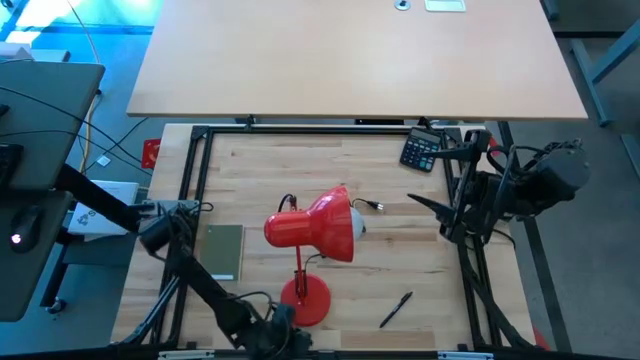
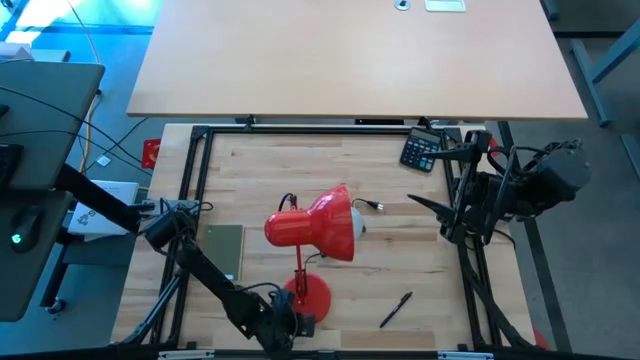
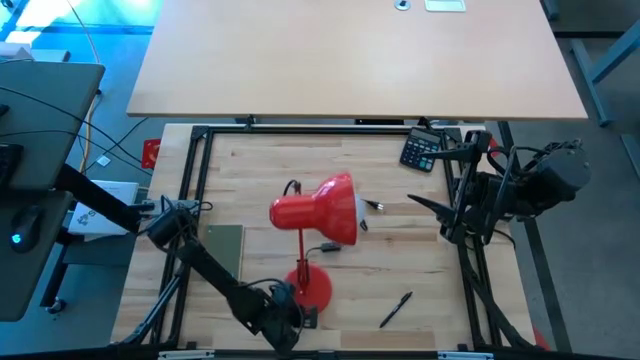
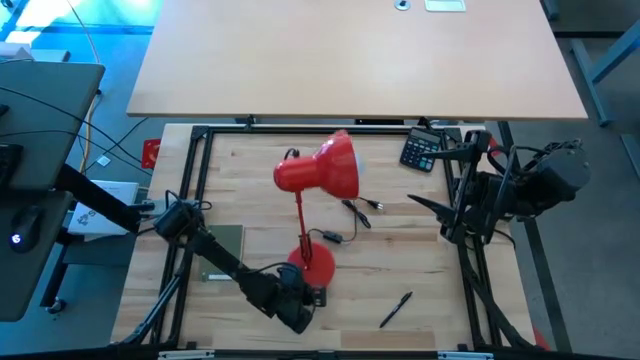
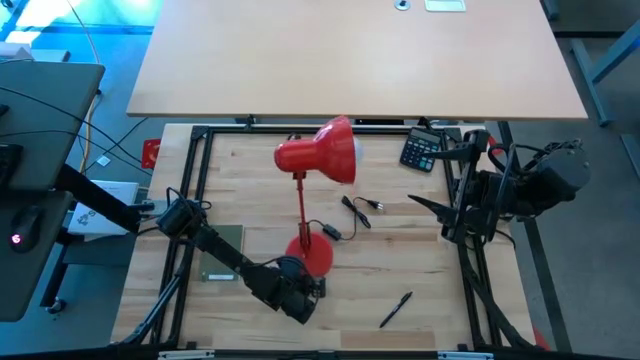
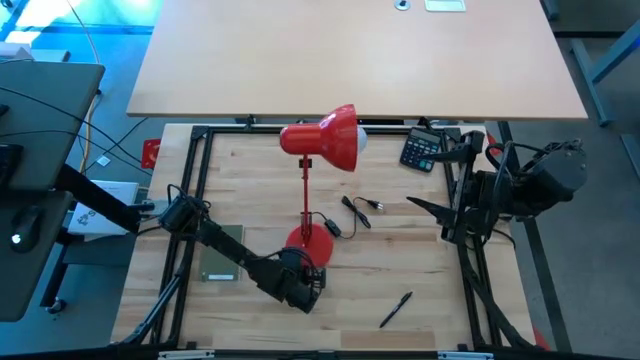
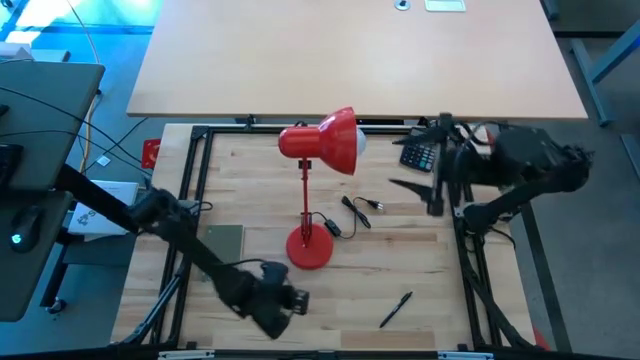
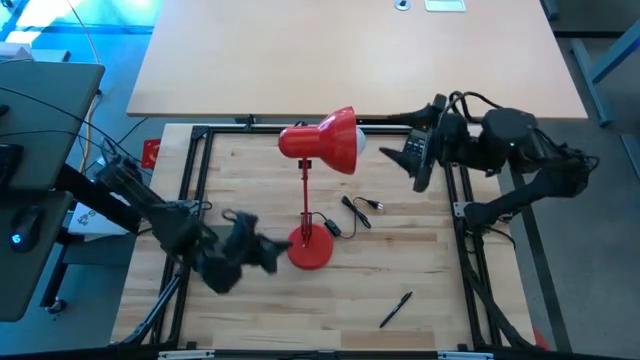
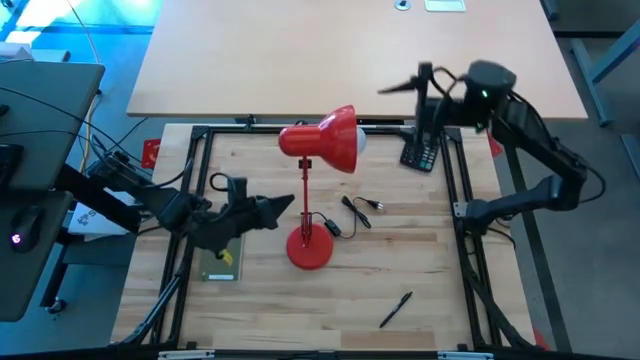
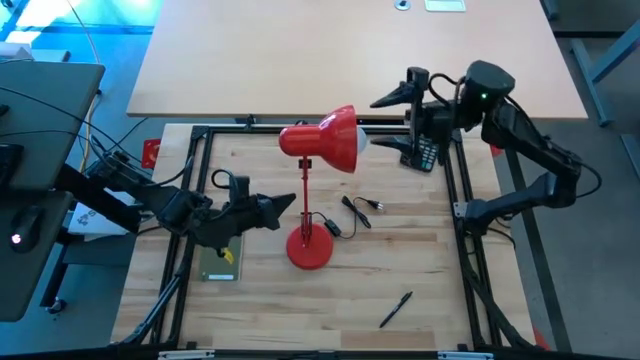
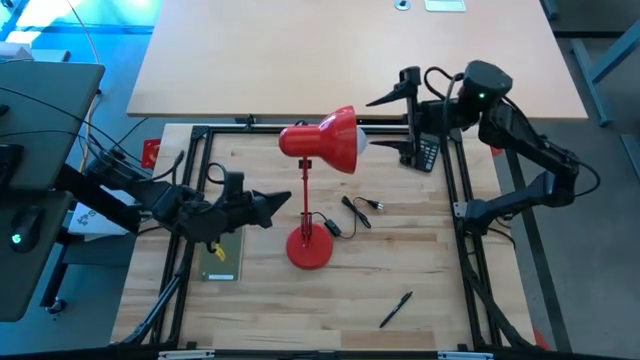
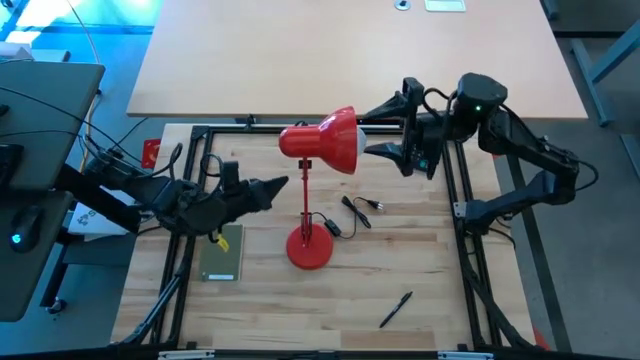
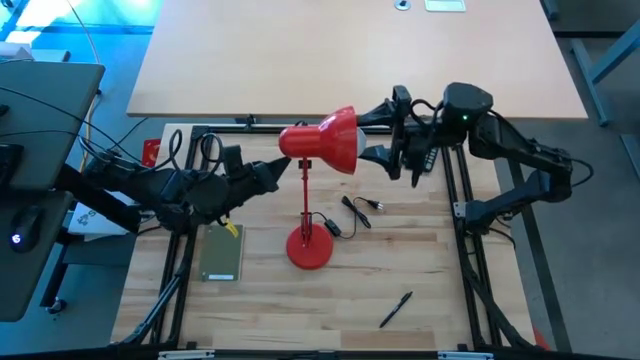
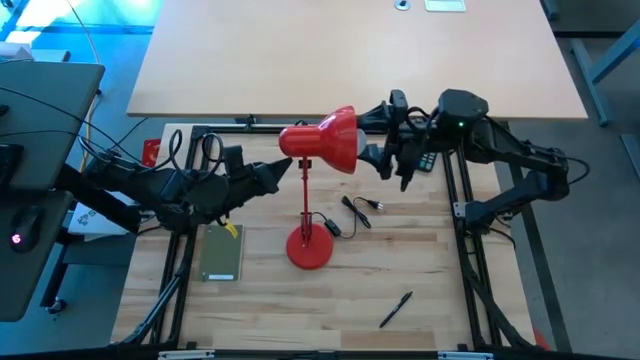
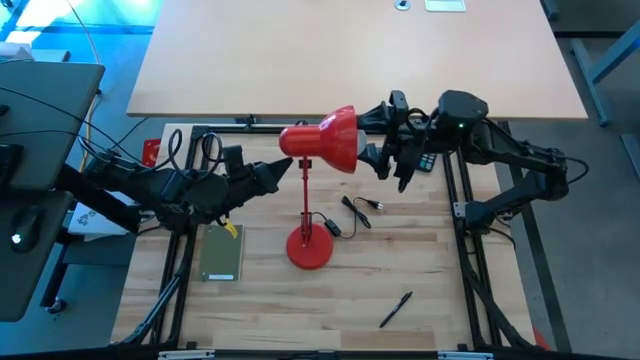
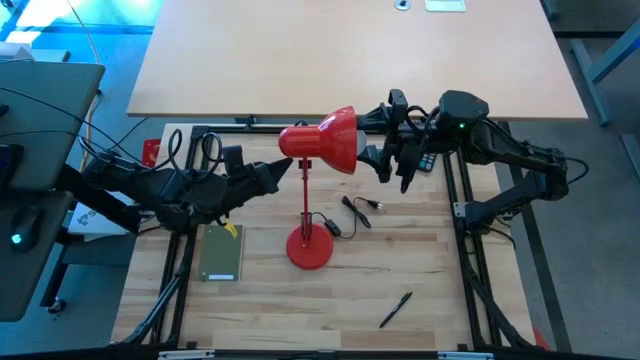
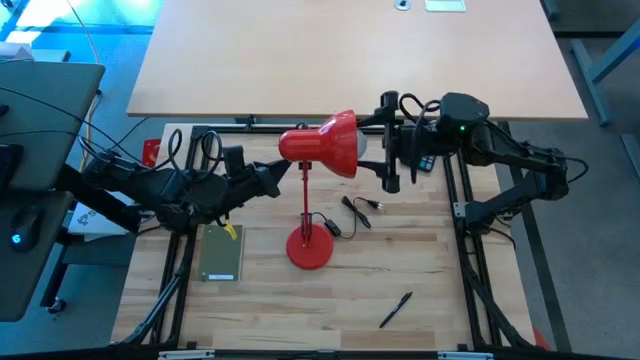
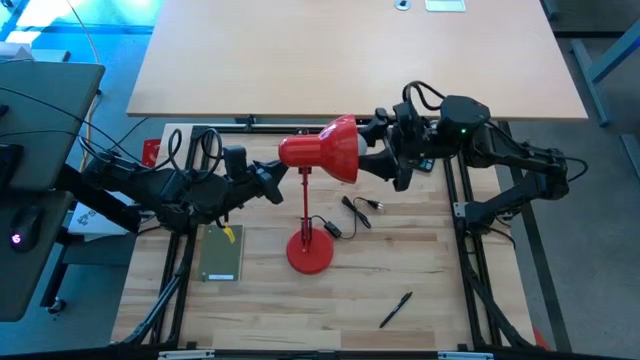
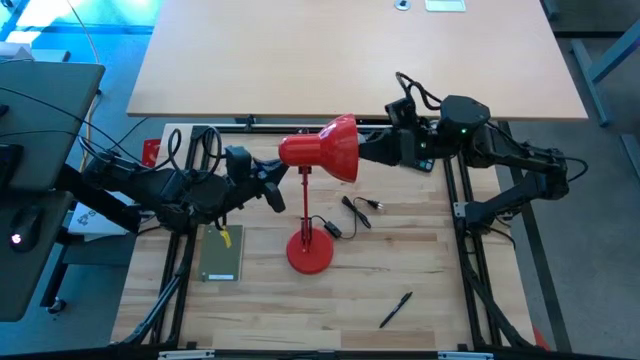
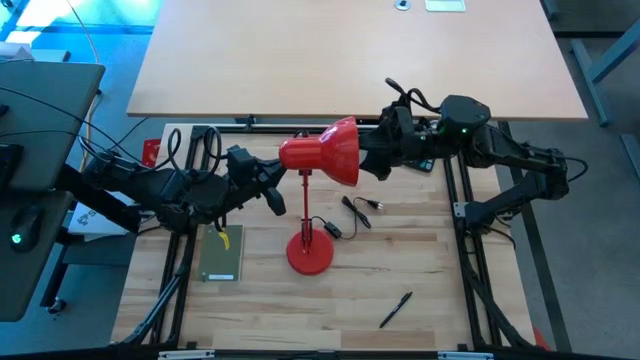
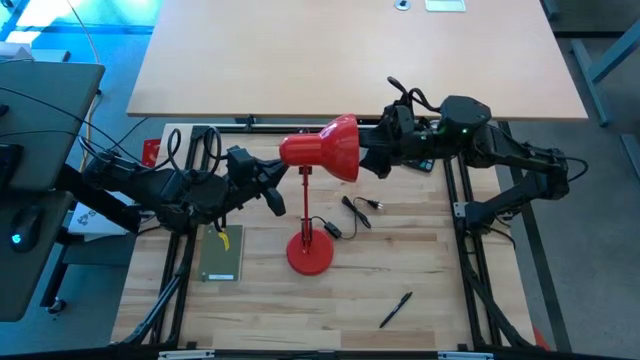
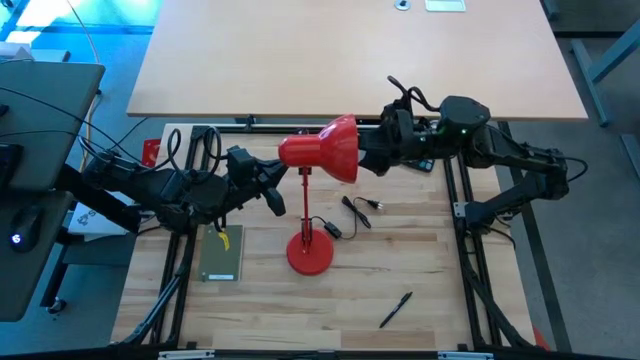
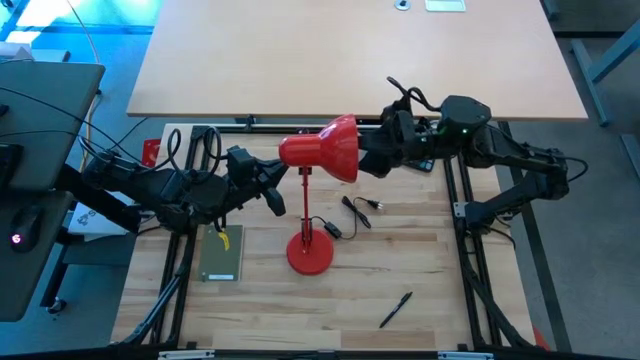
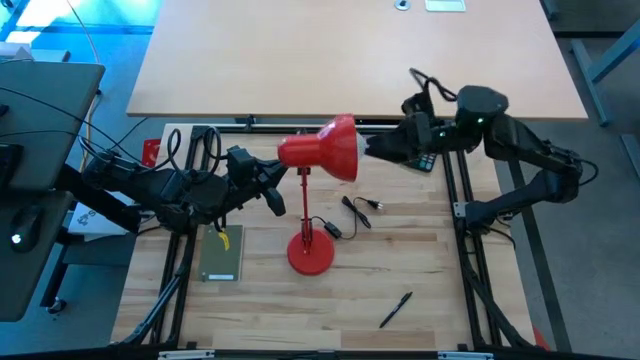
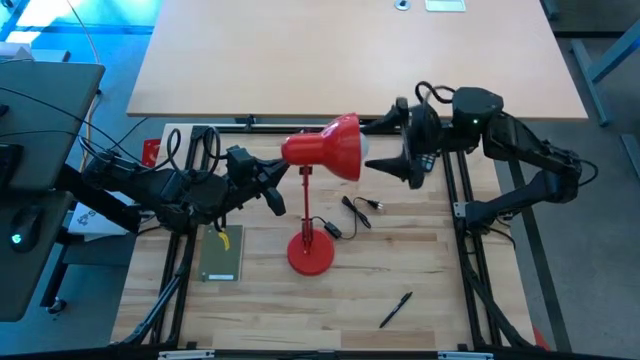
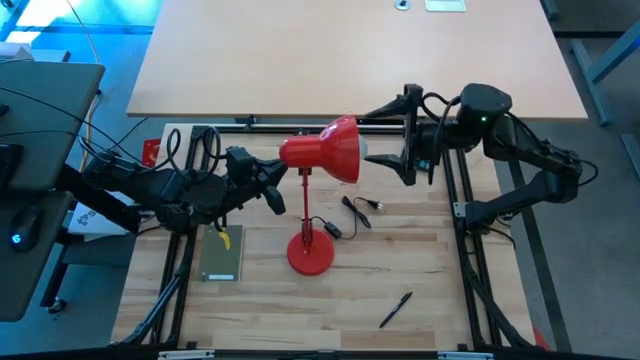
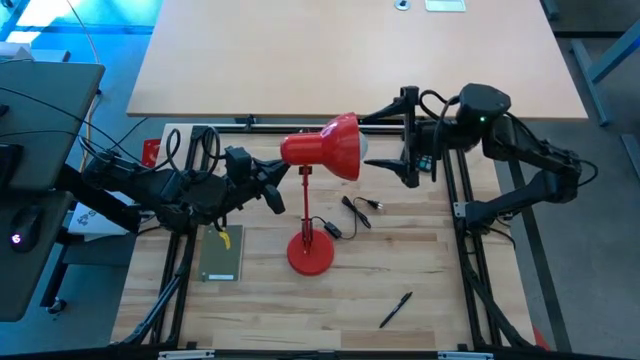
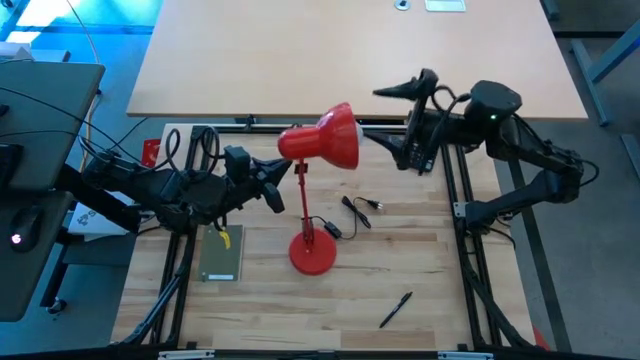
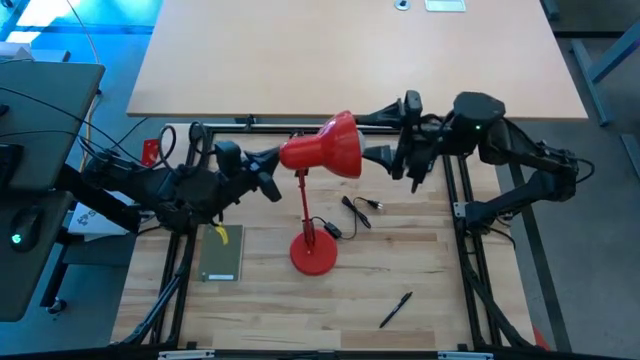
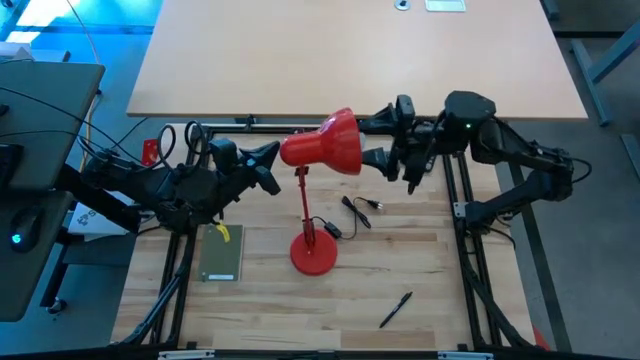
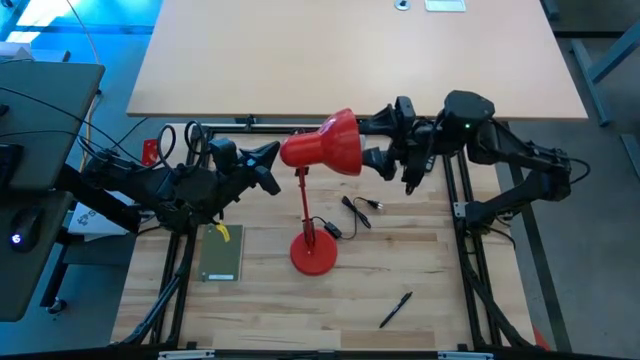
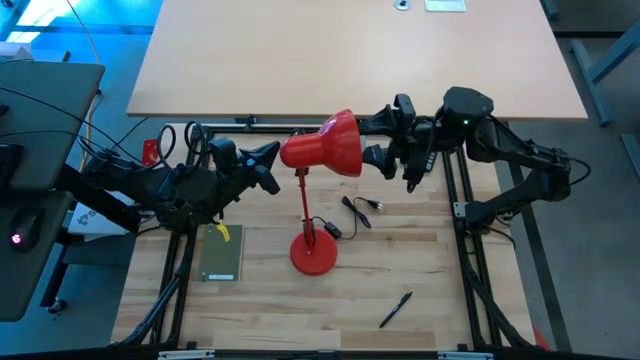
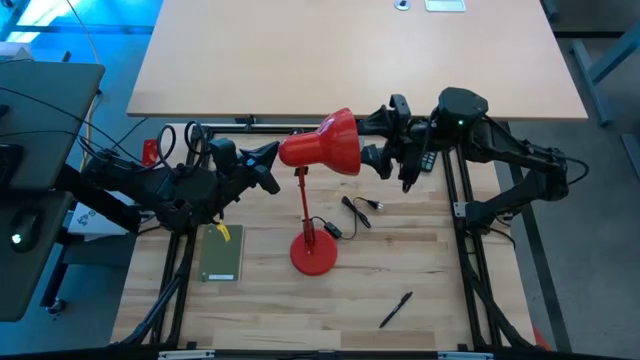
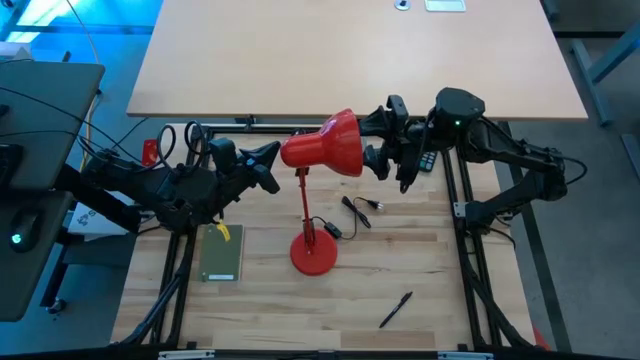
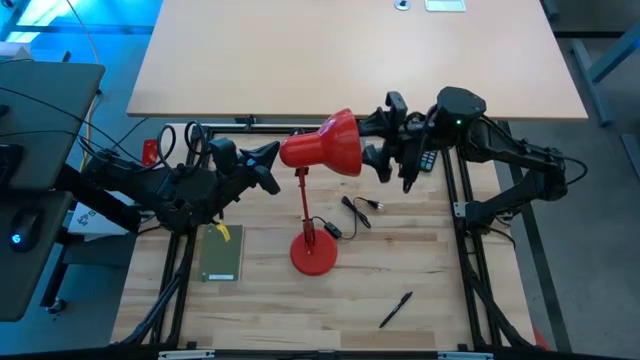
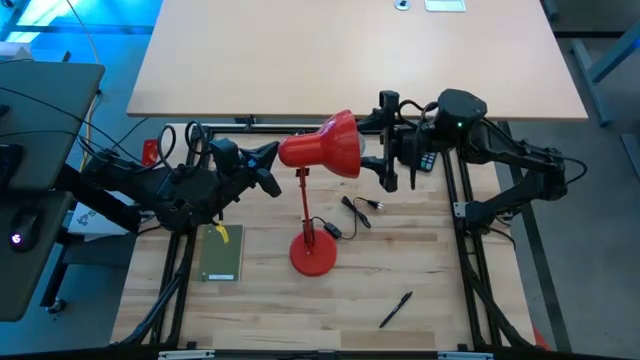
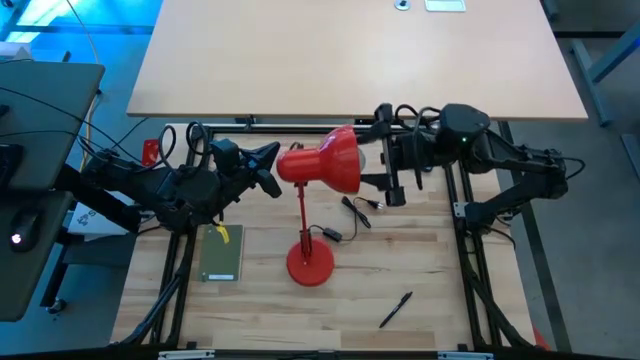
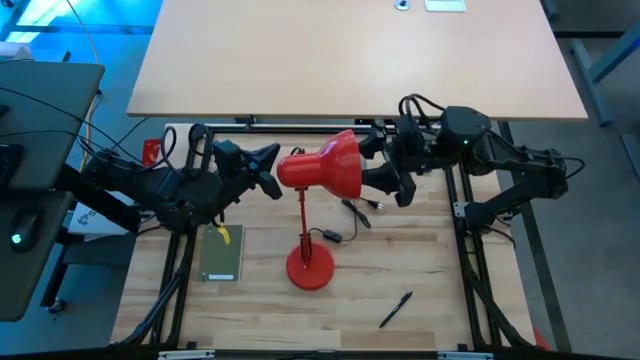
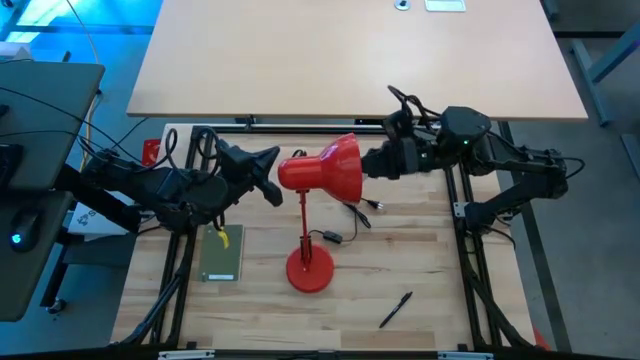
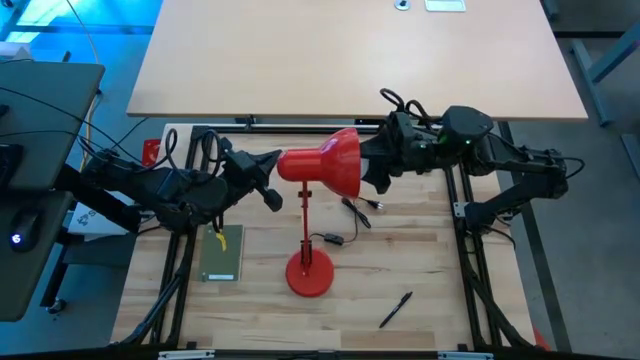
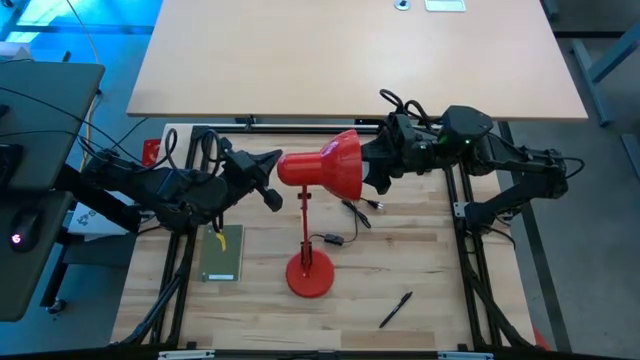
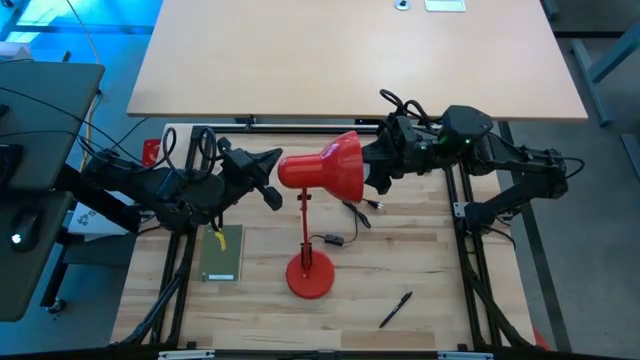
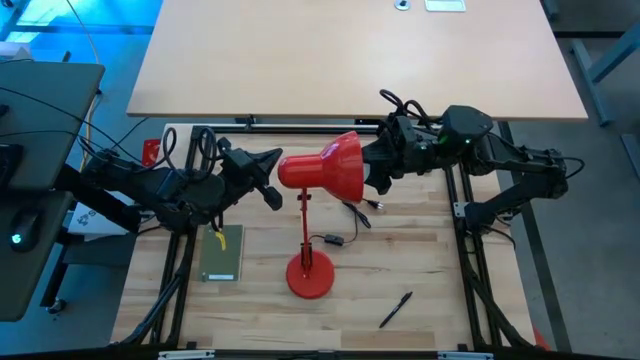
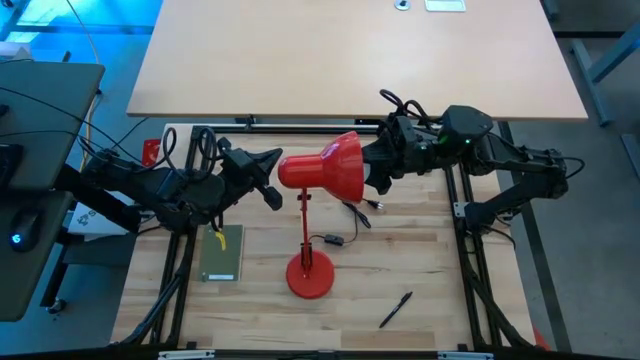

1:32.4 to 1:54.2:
Task: Screw lightbulb
Insert the white lightbulb into the red lamp
